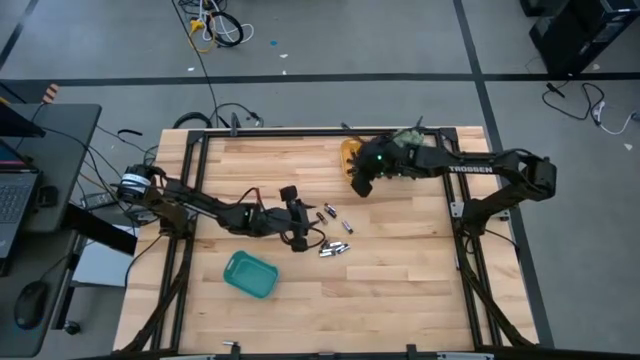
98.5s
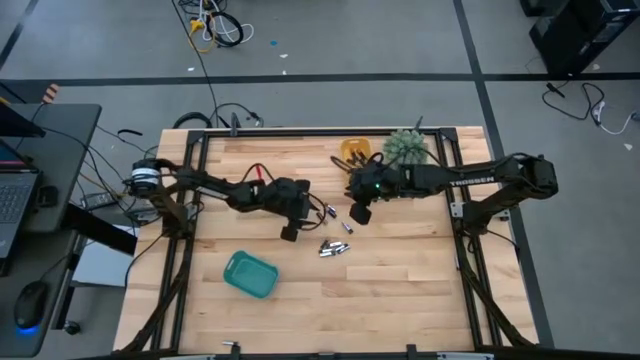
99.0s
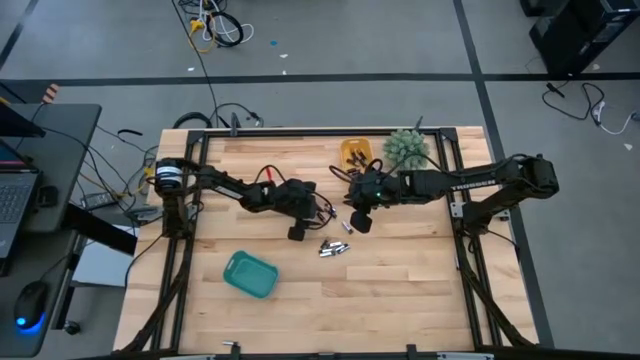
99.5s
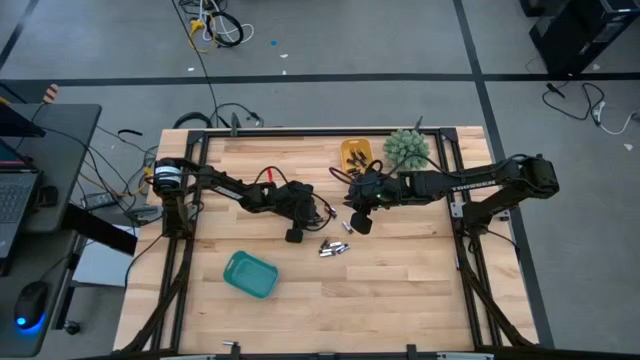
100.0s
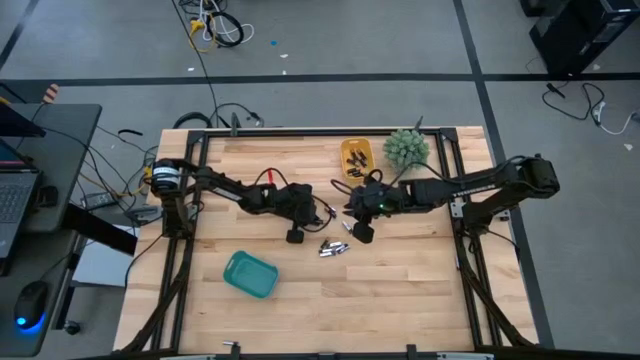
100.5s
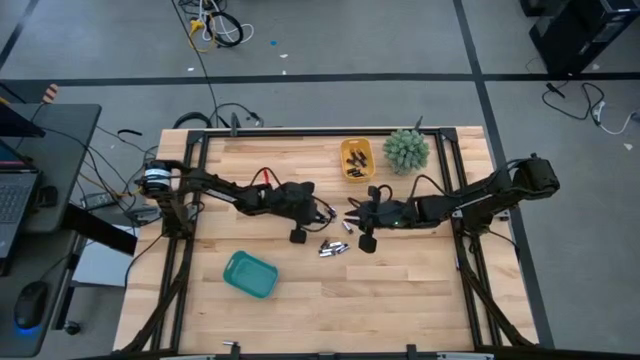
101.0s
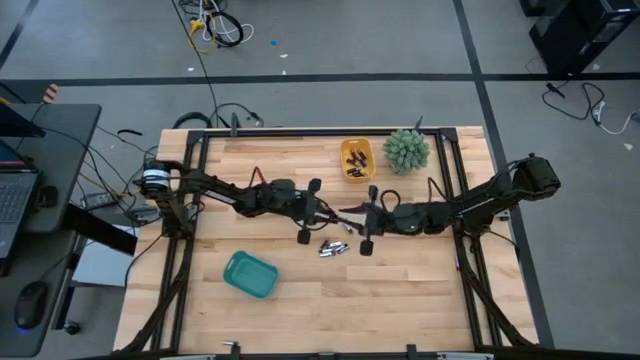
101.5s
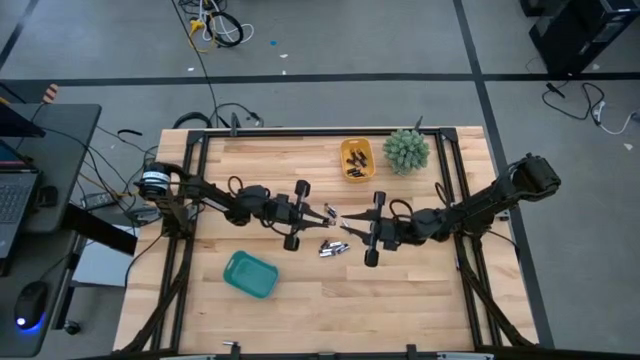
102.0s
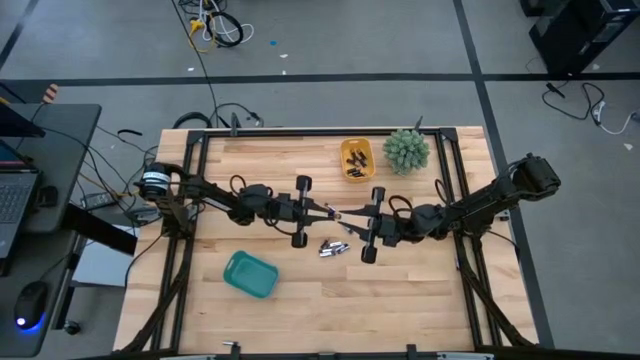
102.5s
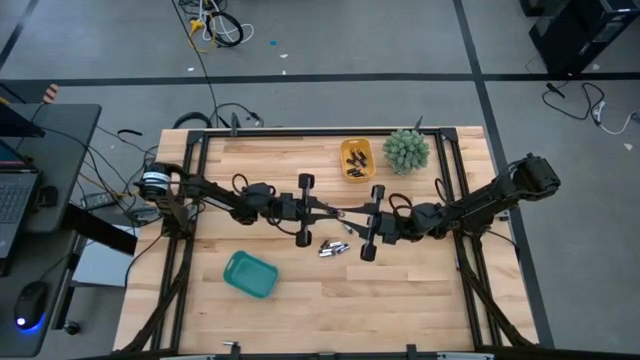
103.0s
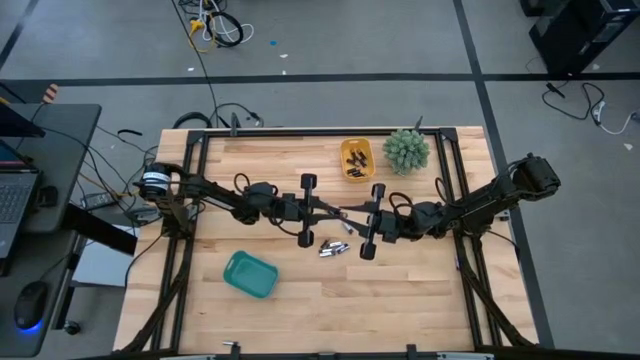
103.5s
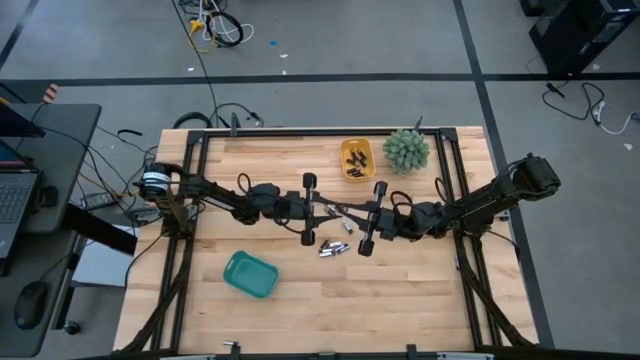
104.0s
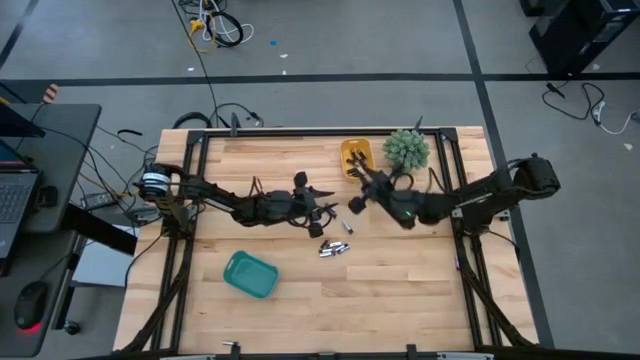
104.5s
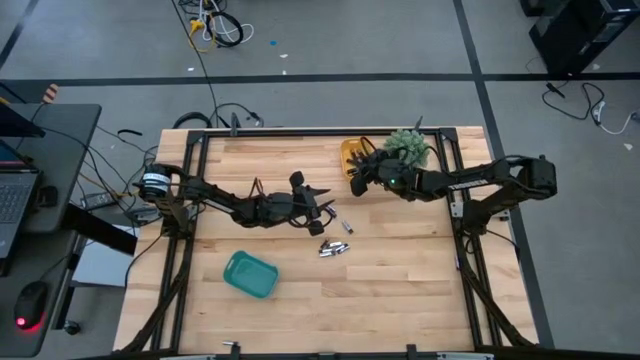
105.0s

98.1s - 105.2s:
Task: Sort batteries
Put the black battery into the yellow bin

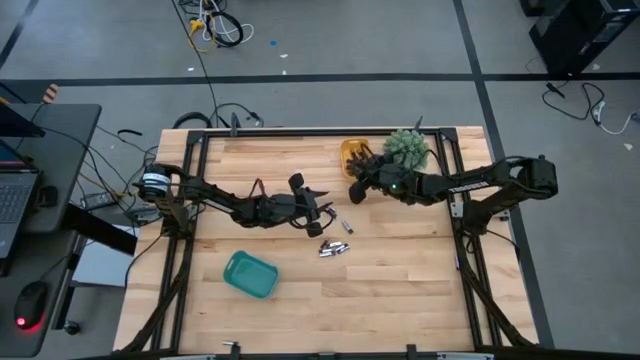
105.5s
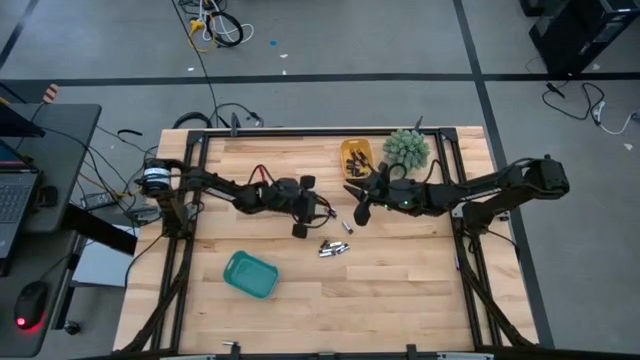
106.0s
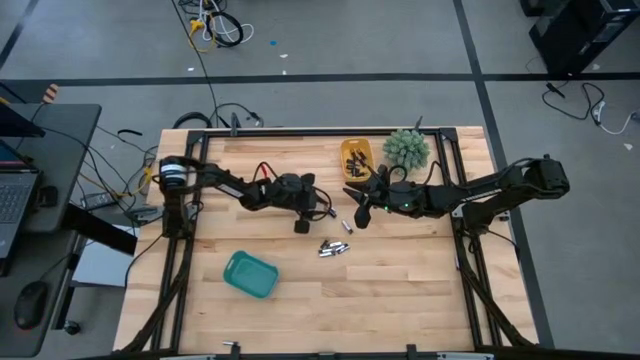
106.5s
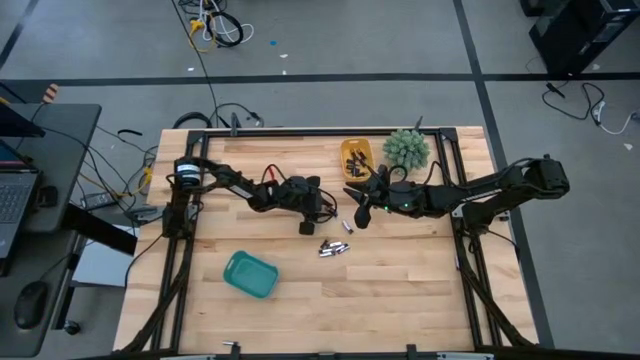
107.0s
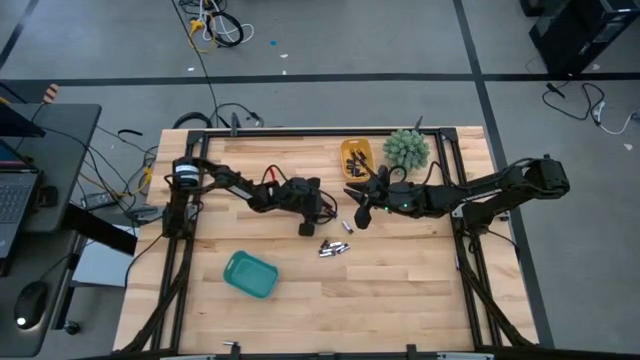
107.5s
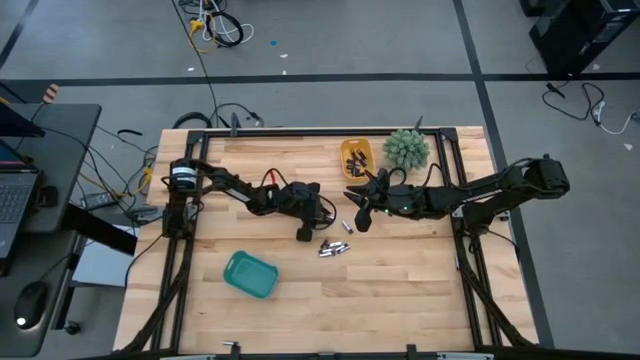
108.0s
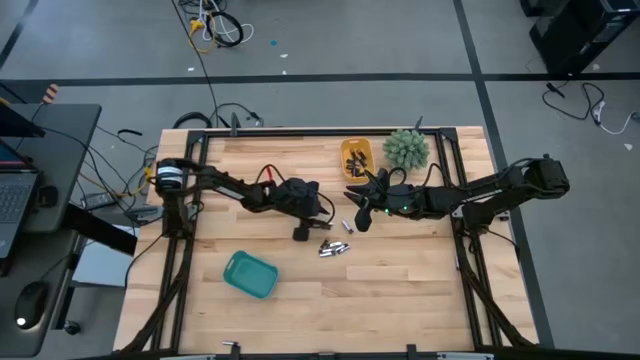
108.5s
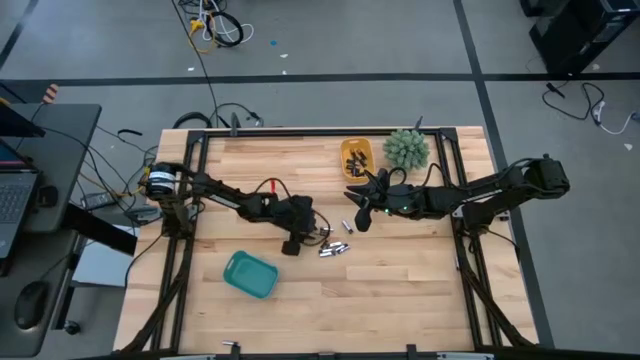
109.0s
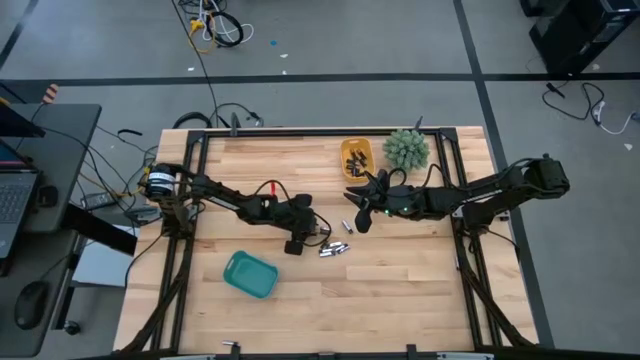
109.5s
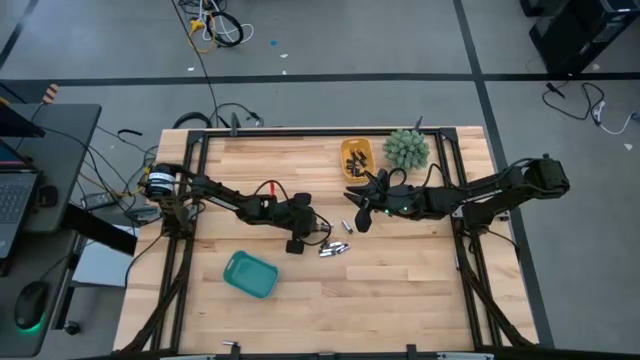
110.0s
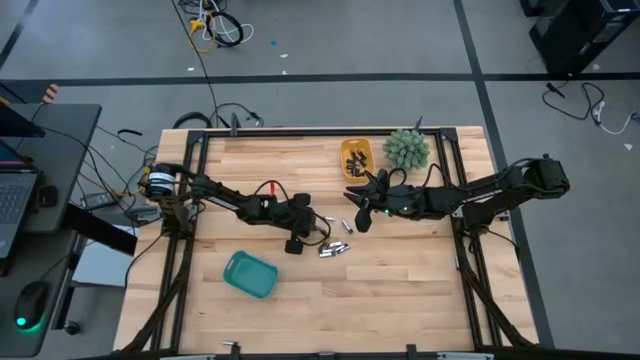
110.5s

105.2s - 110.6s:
Put the black battery into the yellow bin

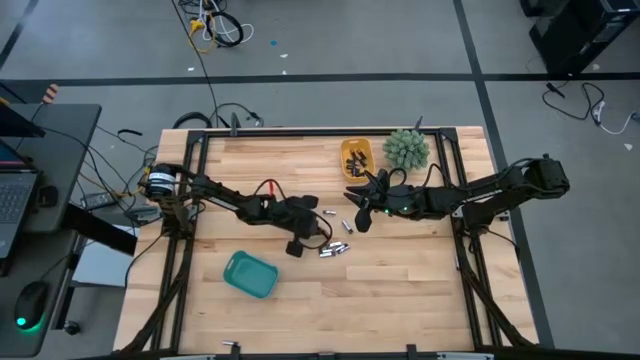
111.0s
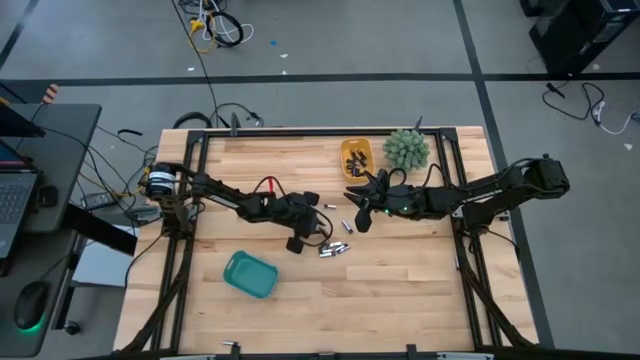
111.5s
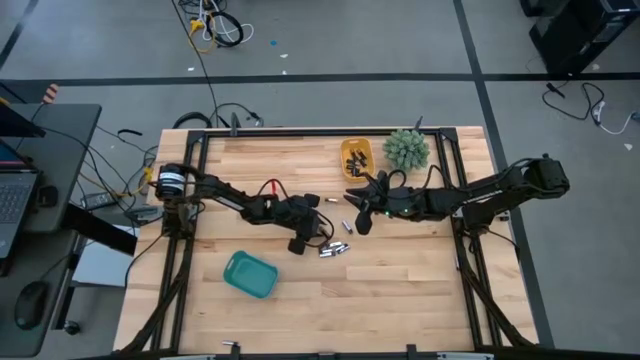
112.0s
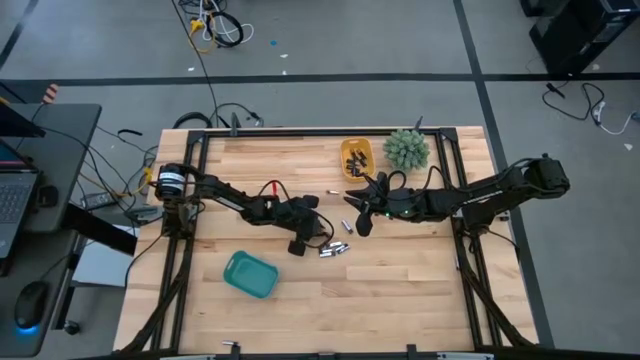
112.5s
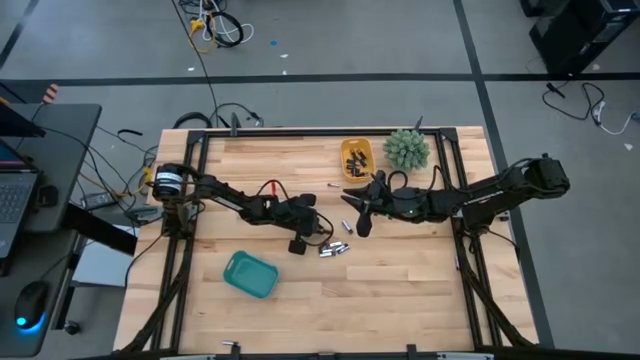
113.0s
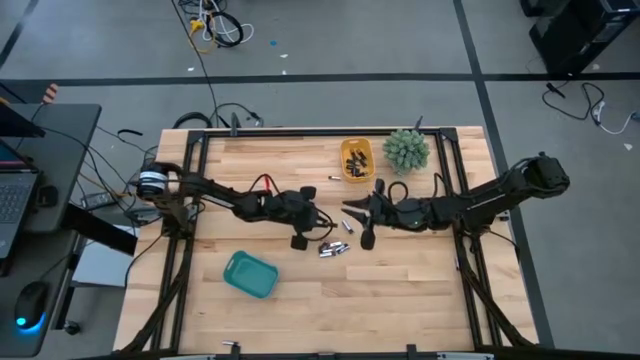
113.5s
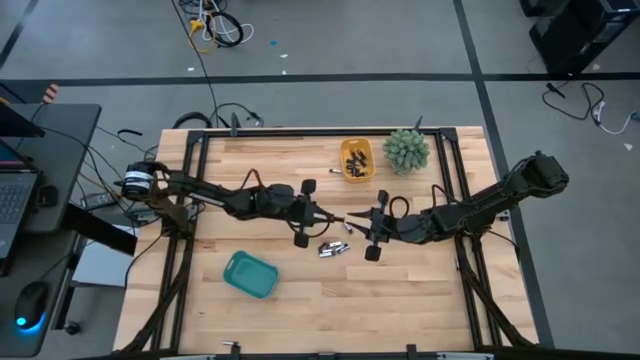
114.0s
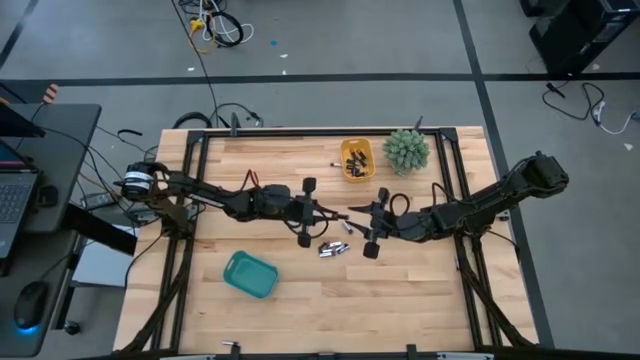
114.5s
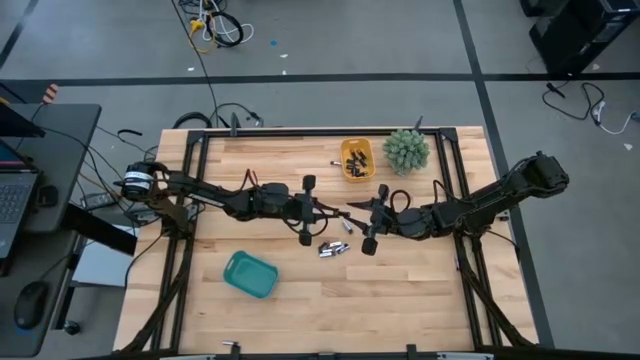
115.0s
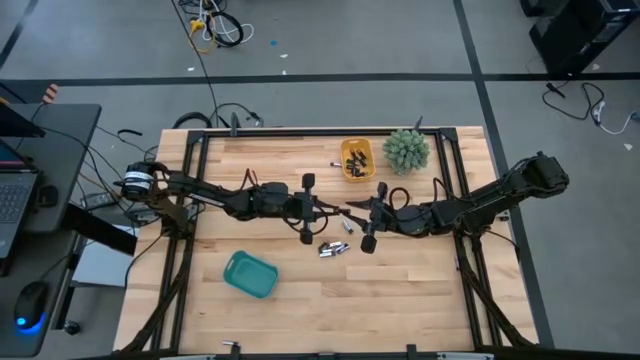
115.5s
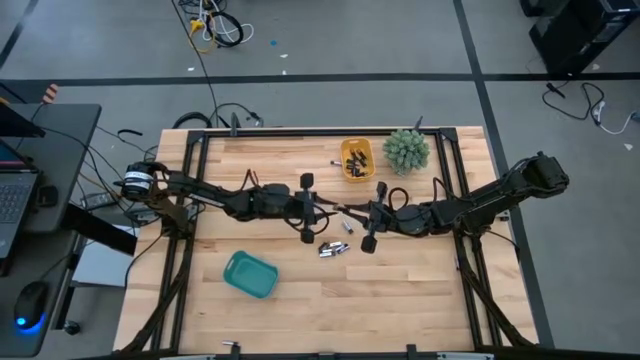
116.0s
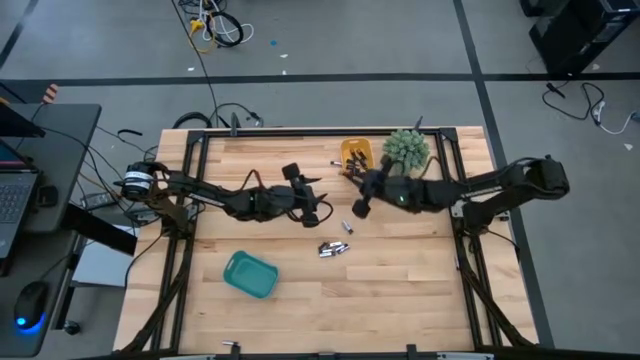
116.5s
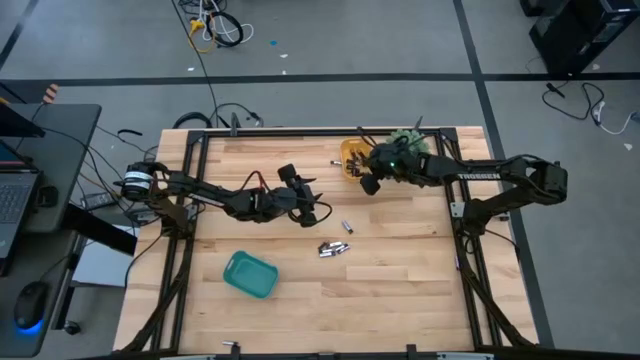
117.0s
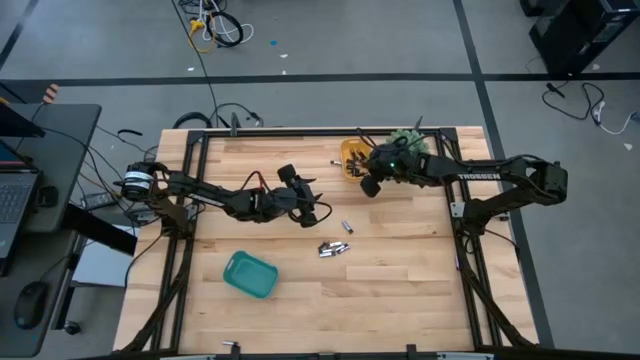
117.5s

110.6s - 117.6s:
Put the black battery into the yellow bin

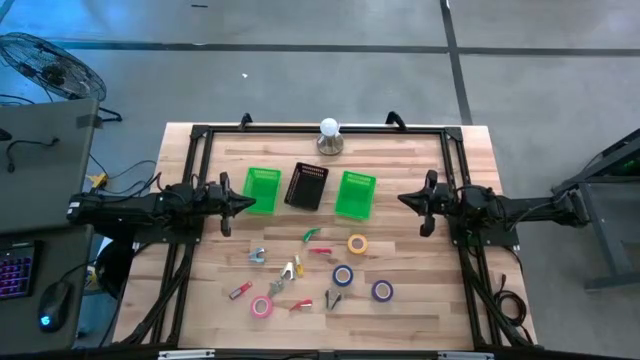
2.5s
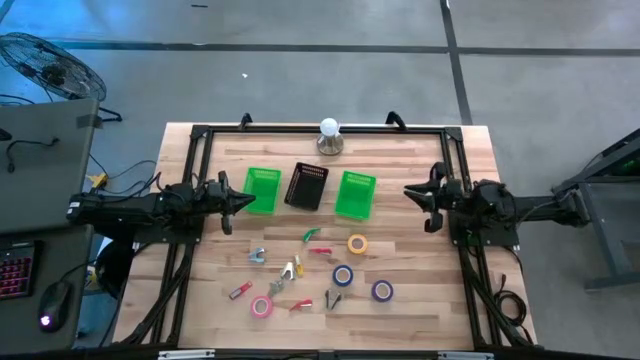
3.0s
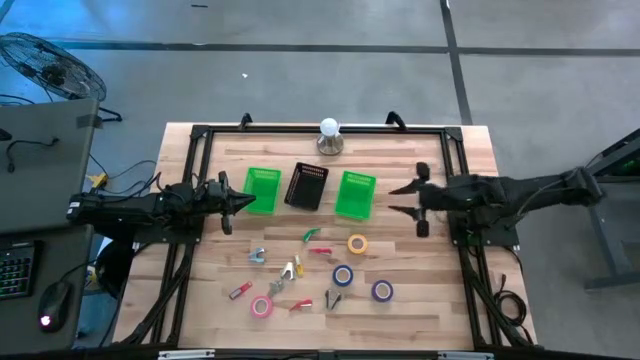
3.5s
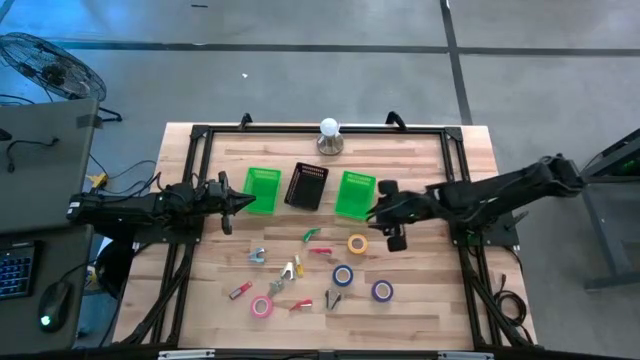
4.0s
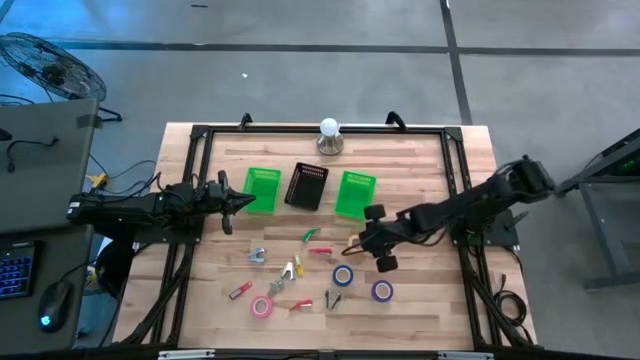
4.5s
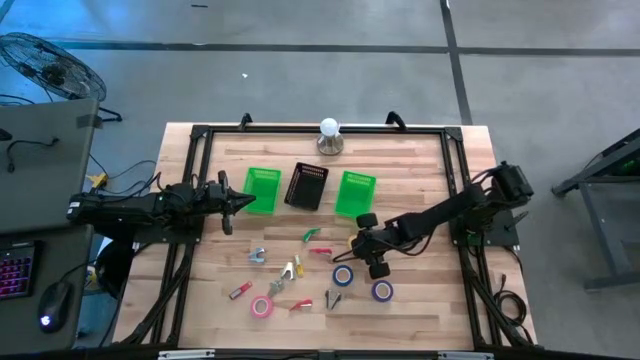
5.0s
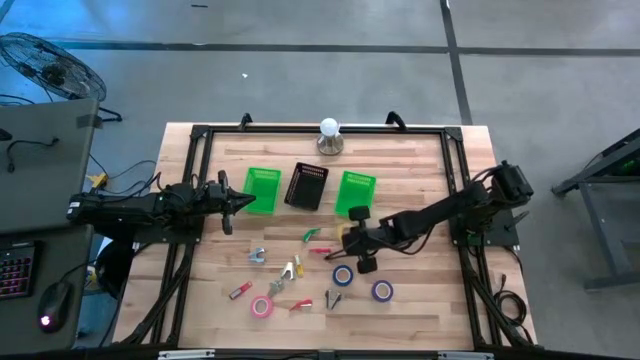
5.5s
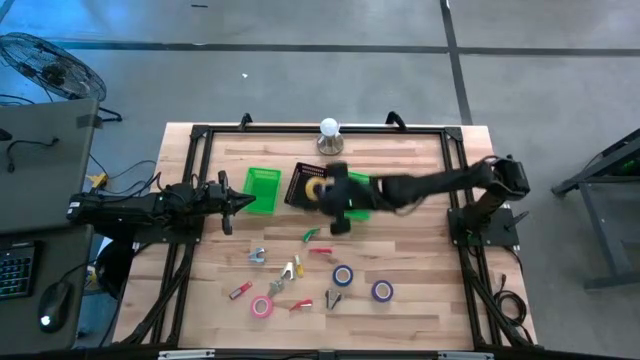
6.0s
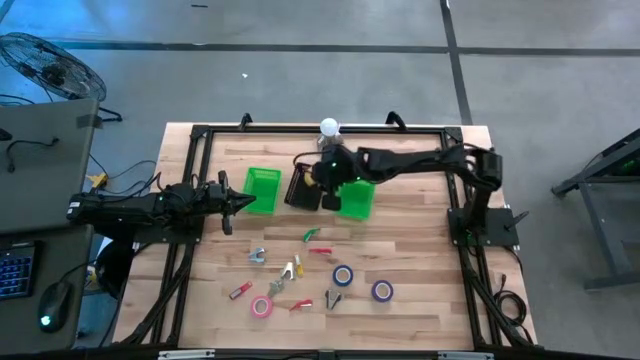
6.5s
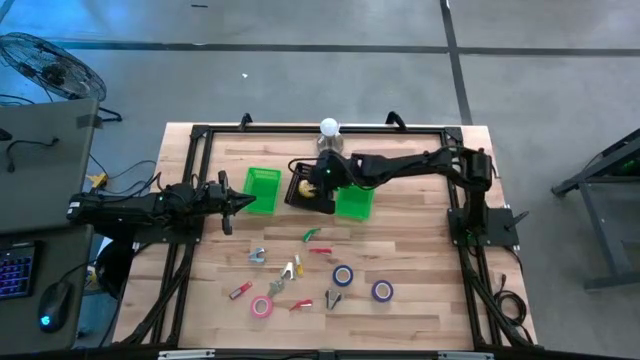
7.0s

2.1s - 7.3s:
Task: Pick and place Stapler, Stapler remover, tape
Put the yellow tape into the black bin
